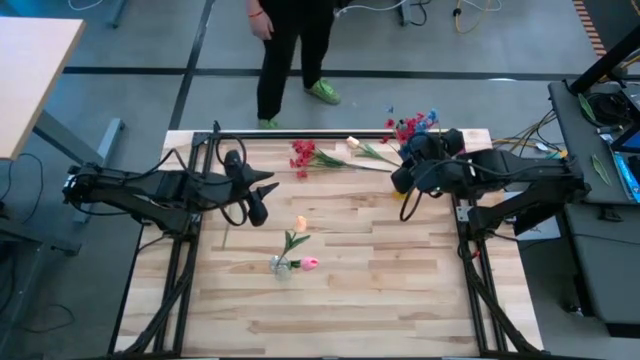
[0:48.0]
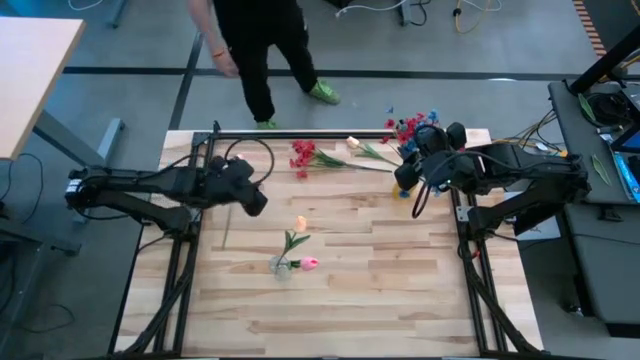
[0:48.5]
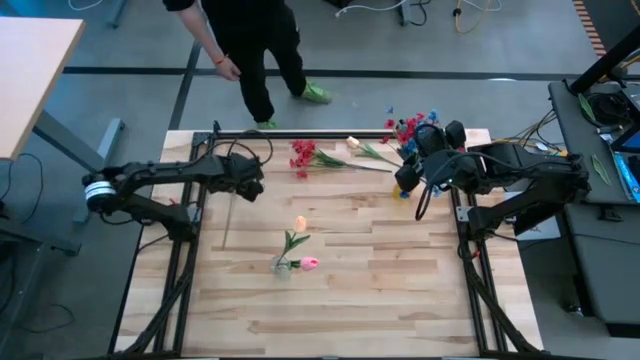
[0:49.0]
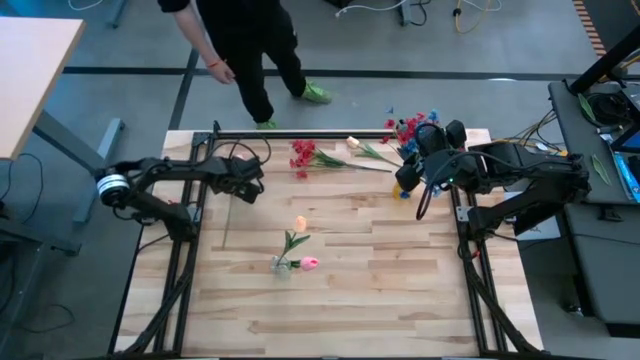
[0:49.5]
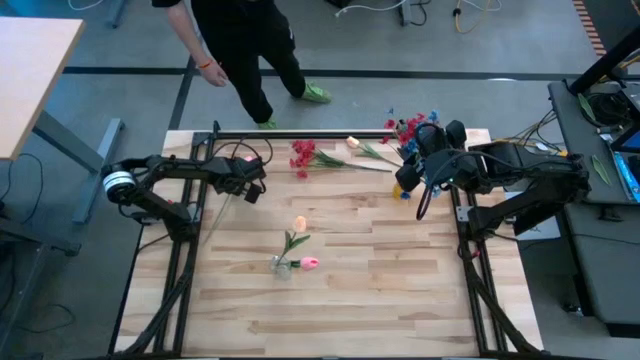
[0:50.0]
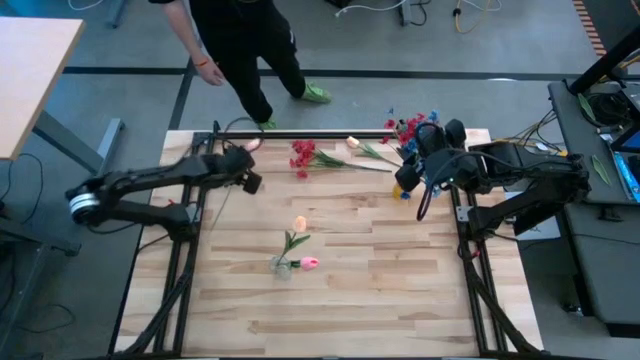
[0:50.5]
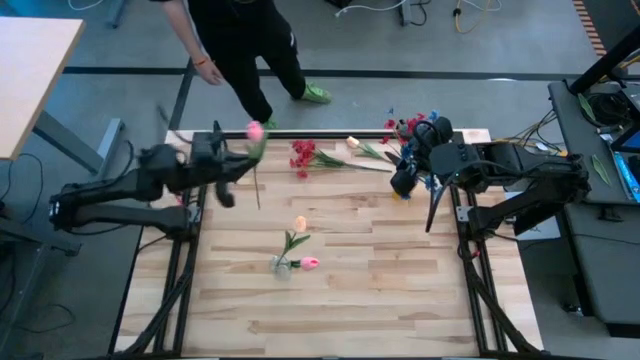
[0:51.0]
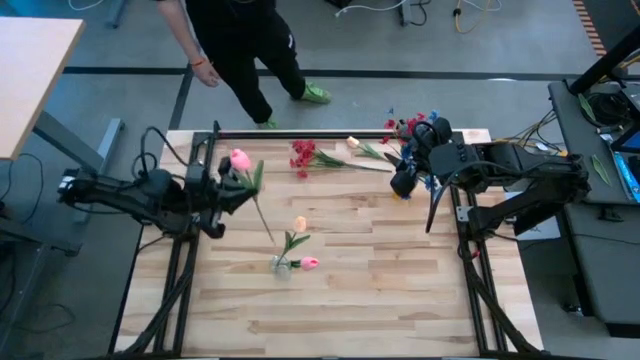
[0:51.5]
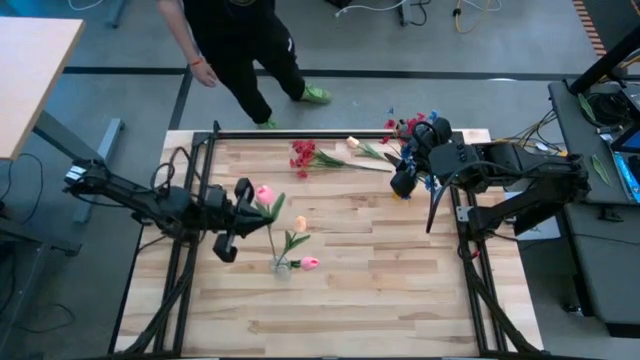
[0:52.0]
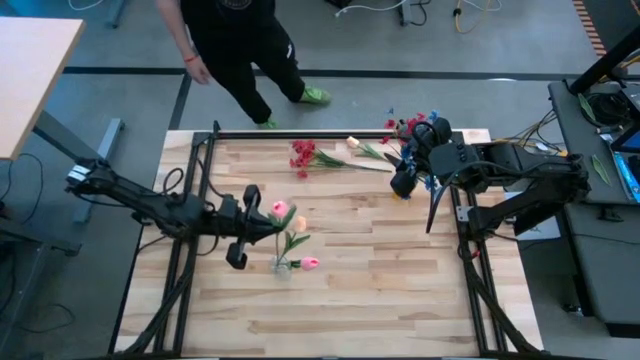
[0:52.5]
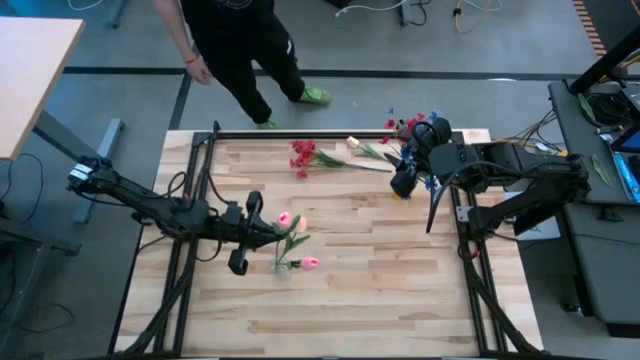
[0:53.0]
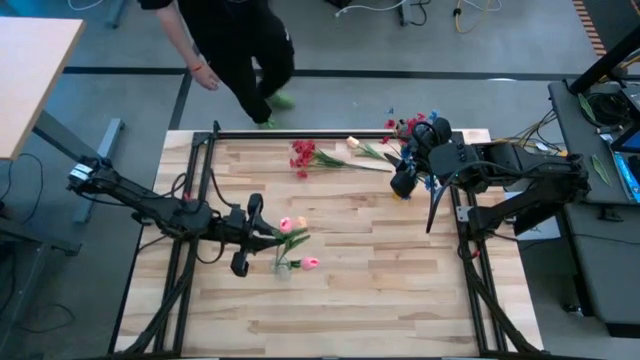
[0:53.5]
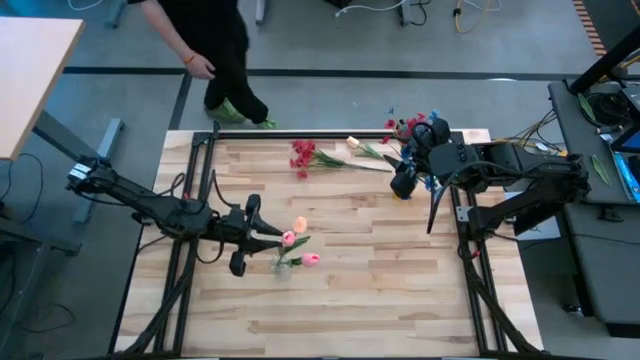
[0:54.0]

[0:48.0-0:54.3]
Task: Sort flowers into vase by color
Put the pink tulip into the transparent vase

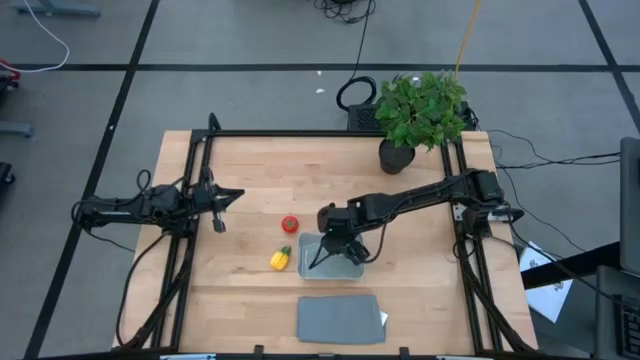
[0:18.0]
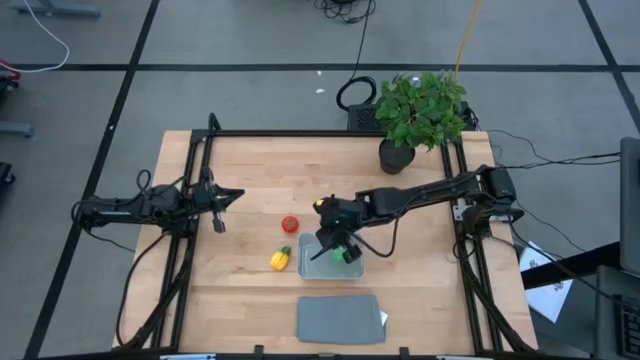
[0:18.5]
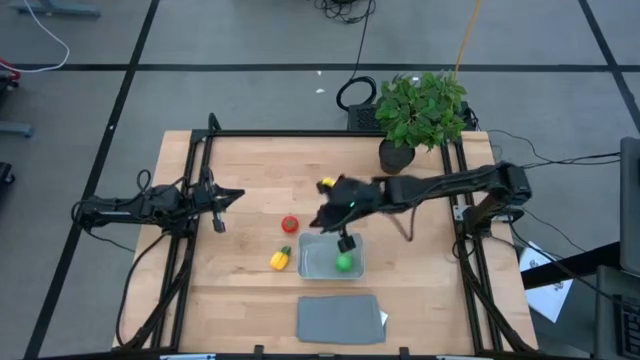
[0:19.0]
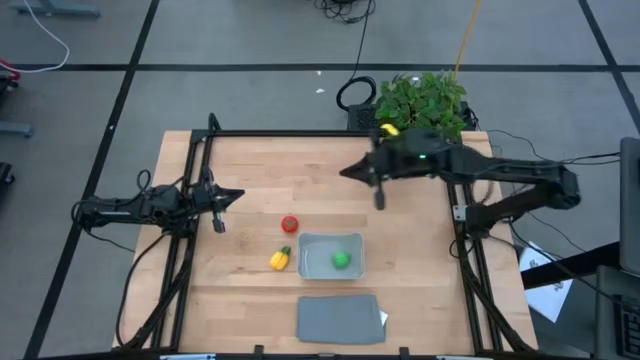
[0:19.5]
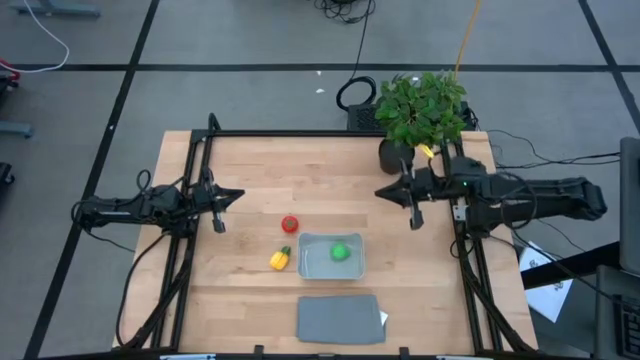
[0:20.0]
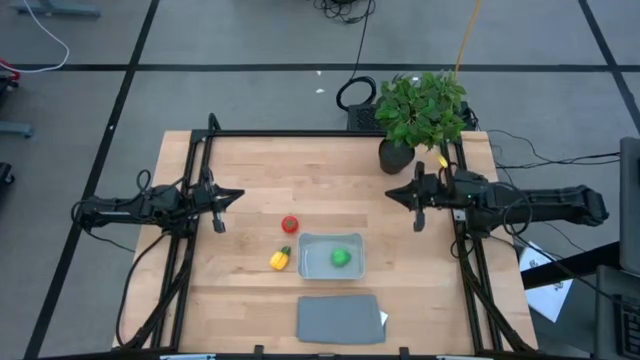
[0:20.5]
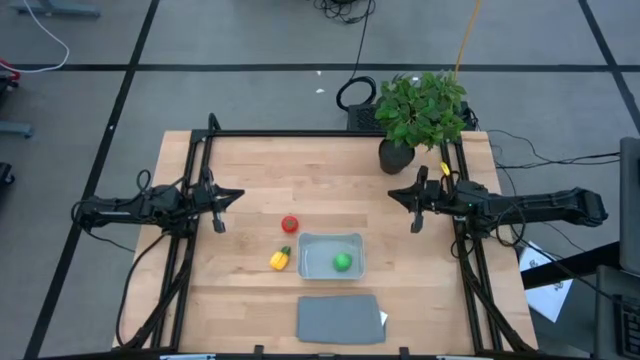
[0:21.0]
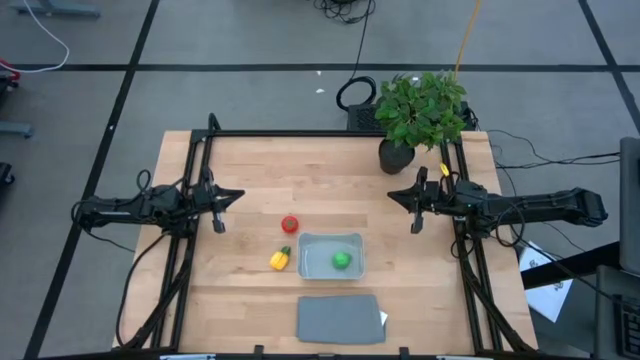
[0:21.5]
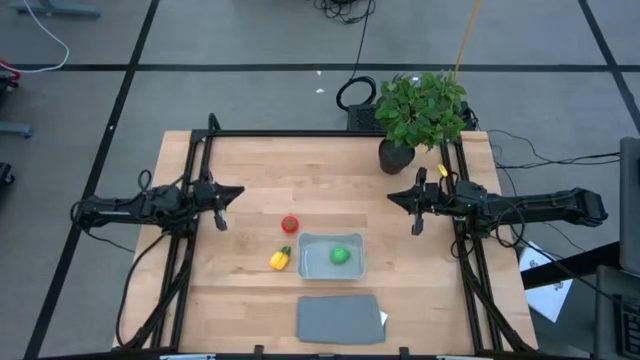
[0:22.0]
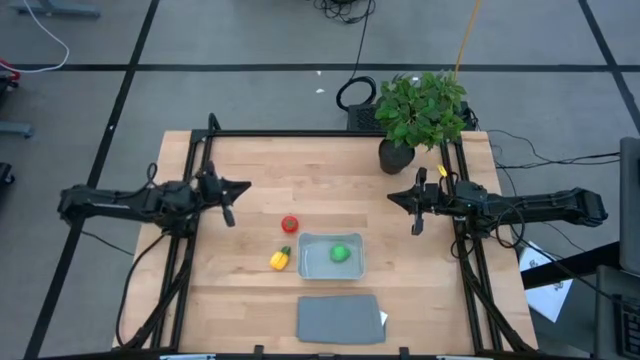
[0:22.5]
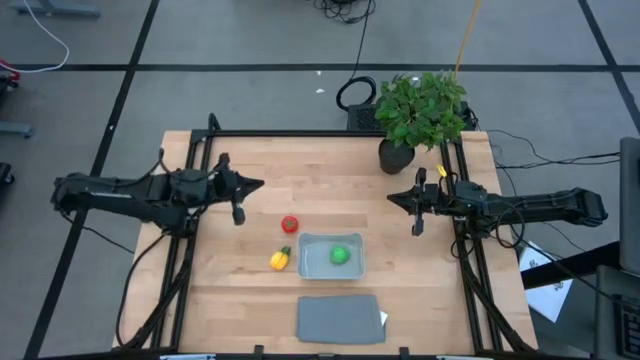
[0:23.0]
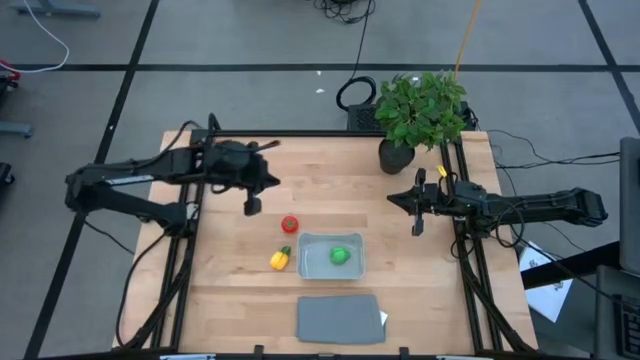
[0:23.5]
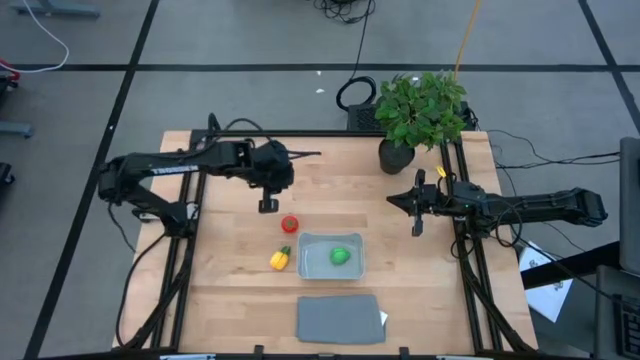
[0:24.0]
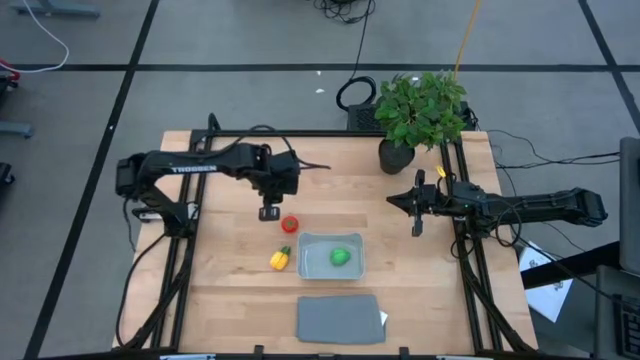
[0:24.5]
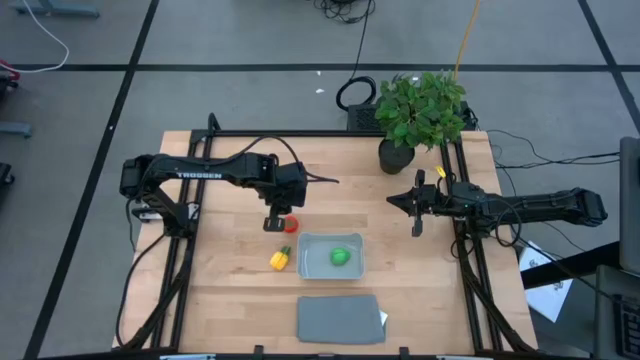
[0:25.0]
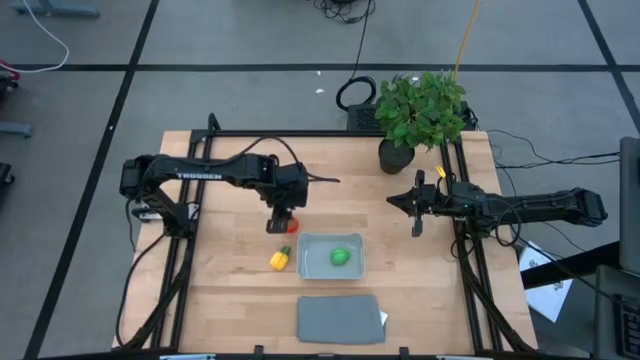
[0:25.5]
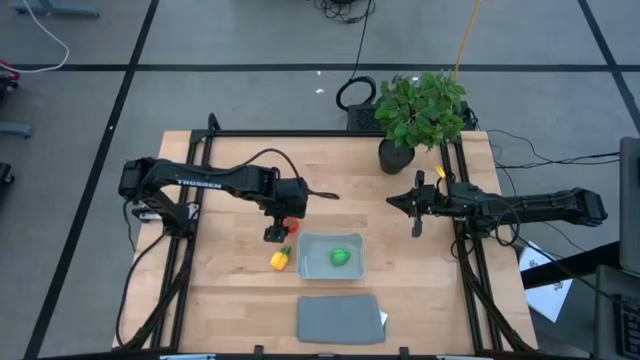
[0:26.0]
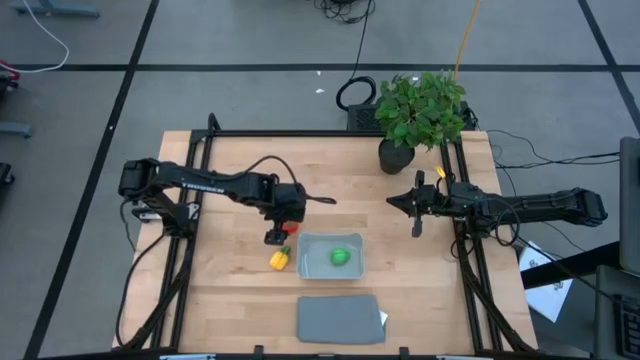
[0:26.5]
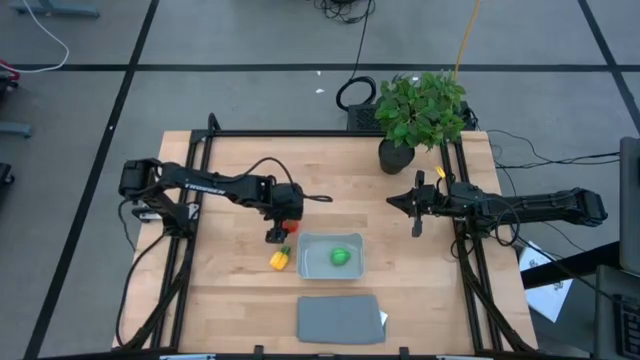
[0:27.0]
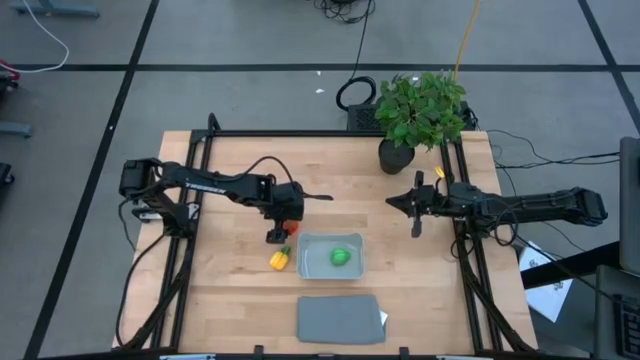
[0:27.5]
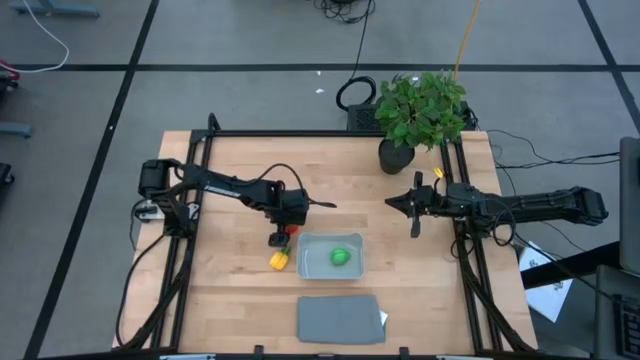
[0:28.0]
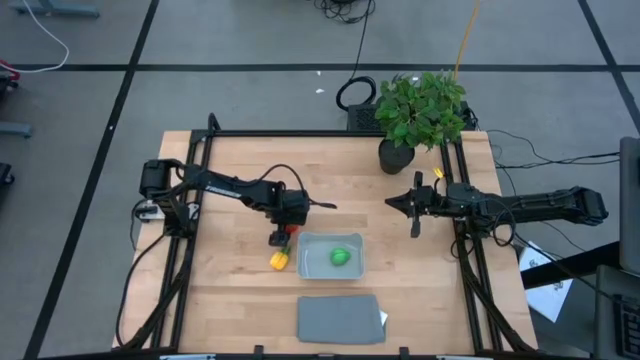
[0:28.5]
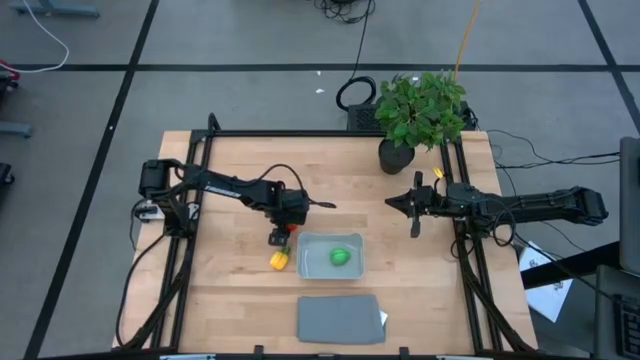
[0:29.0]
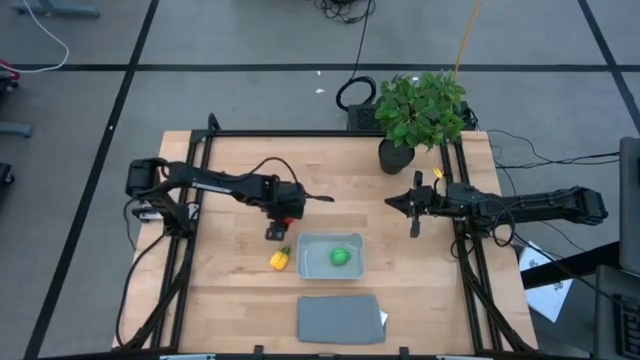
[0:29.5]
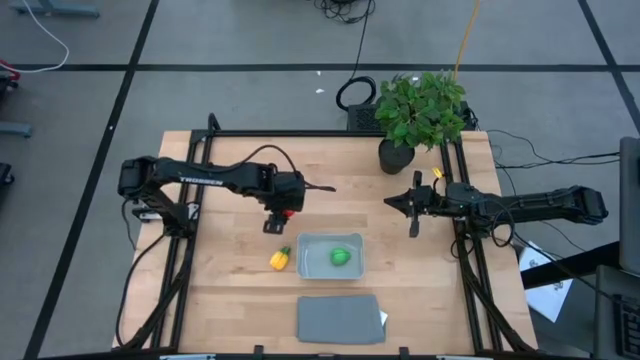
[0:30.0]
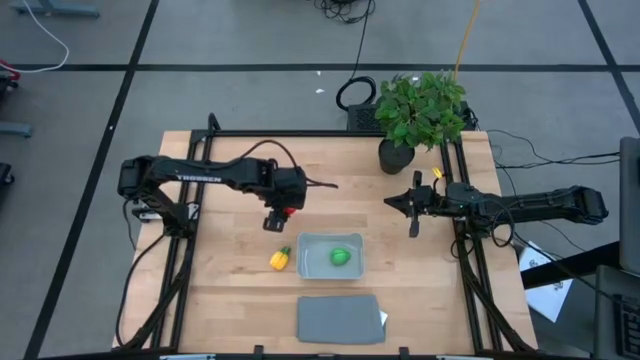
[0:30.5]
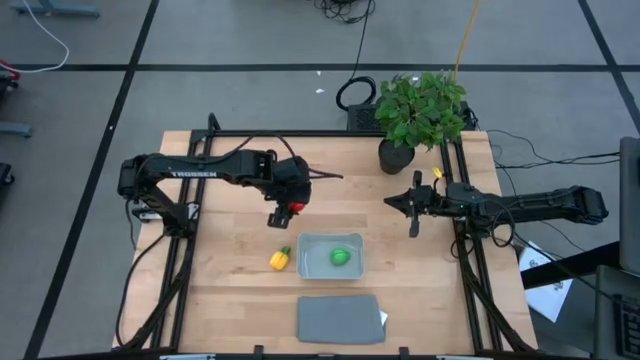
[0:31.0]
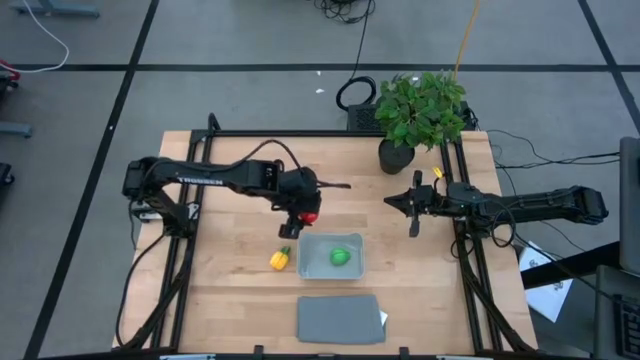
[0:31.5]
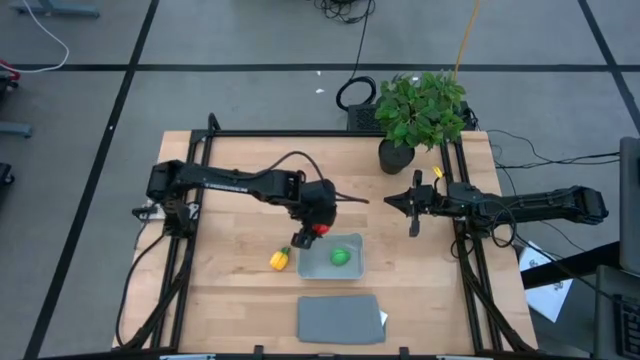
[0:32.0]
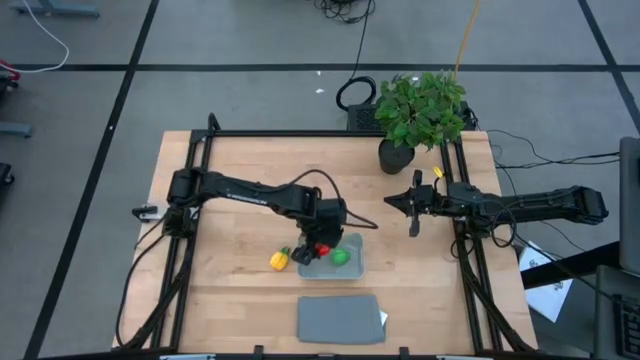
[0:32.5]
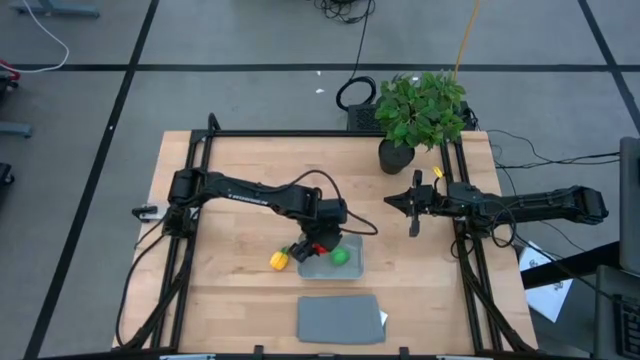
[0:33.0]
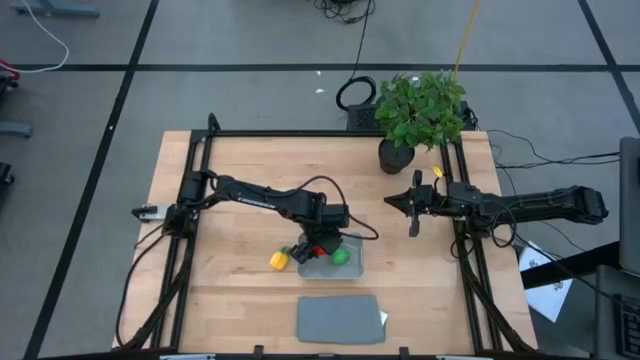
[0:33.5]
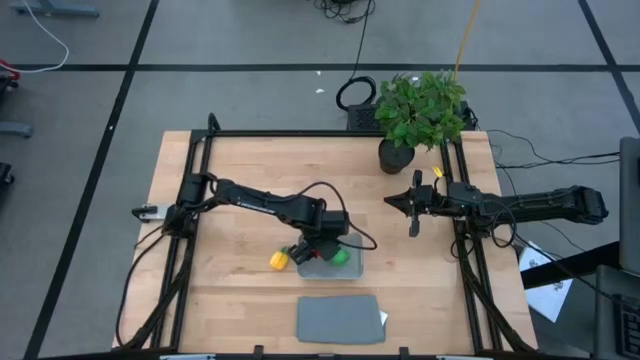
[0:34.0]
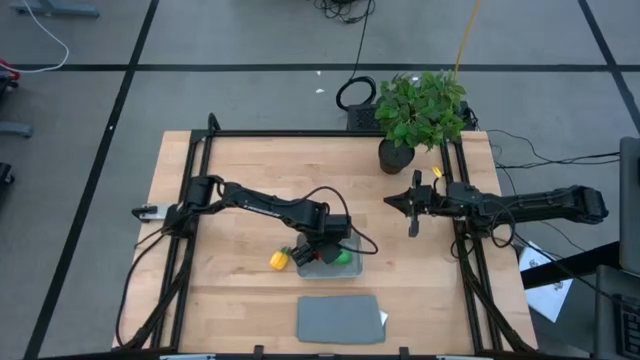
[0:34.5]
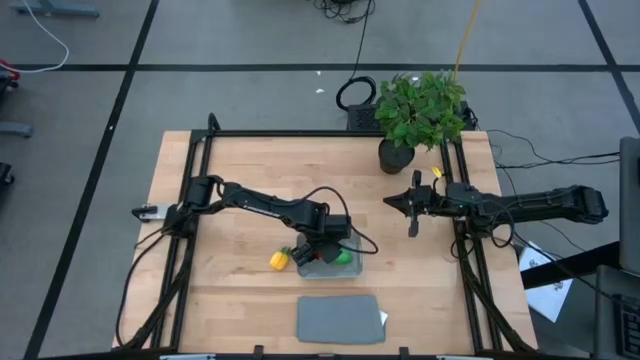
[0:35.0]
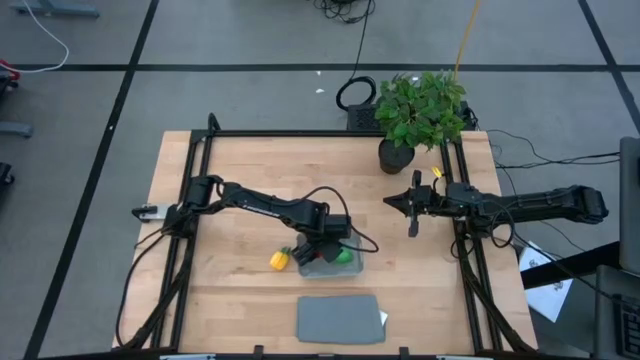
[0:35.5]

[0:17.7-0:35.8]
Task: Pick and placing Produce into tupperware
Put the tomato into the bin
